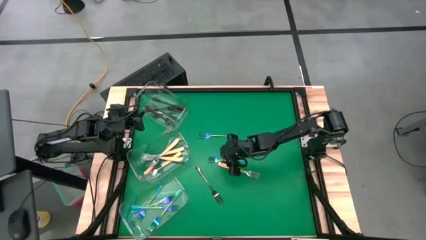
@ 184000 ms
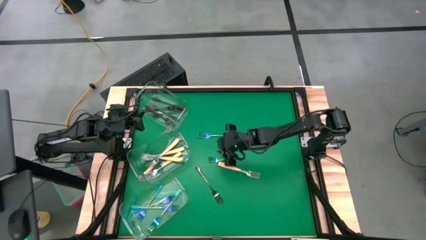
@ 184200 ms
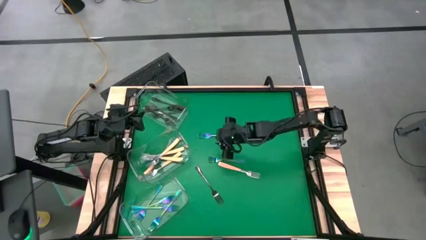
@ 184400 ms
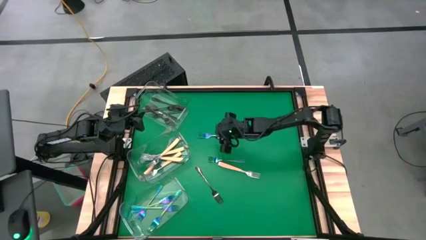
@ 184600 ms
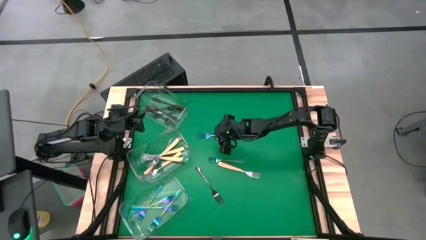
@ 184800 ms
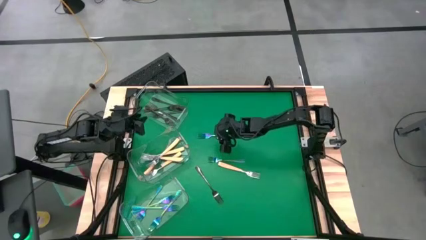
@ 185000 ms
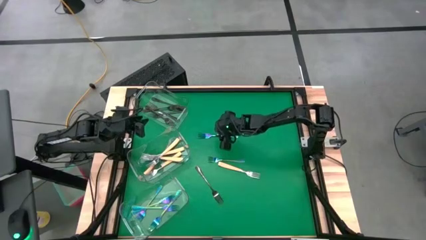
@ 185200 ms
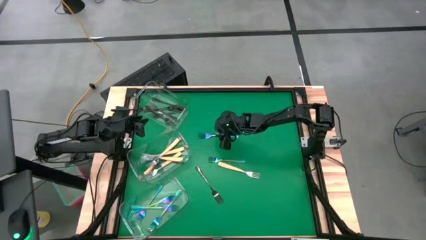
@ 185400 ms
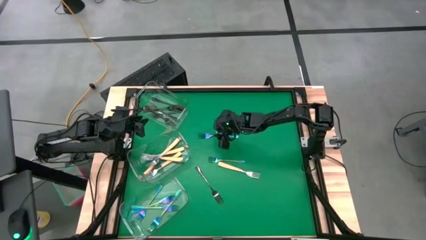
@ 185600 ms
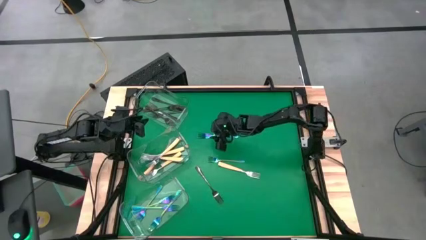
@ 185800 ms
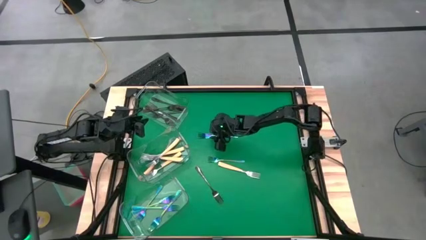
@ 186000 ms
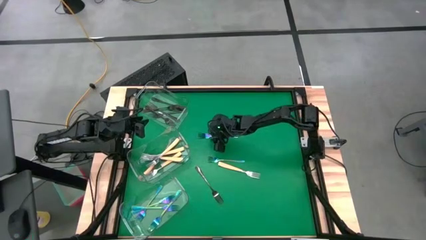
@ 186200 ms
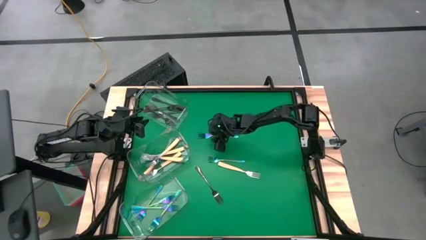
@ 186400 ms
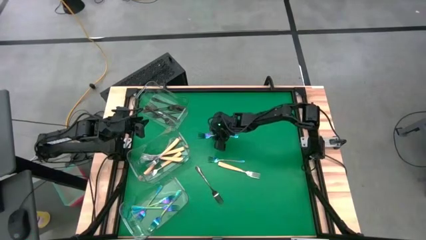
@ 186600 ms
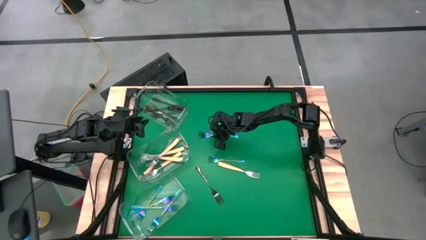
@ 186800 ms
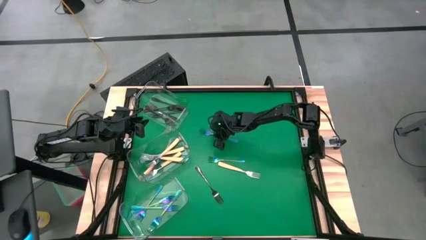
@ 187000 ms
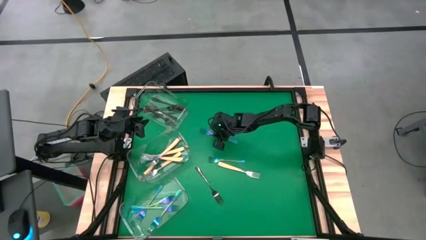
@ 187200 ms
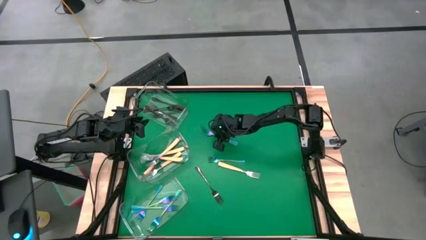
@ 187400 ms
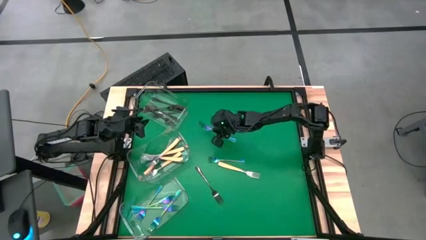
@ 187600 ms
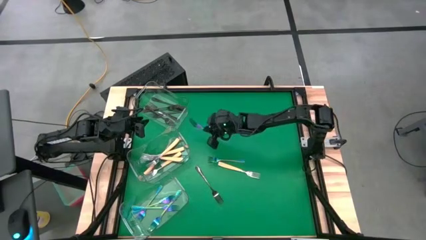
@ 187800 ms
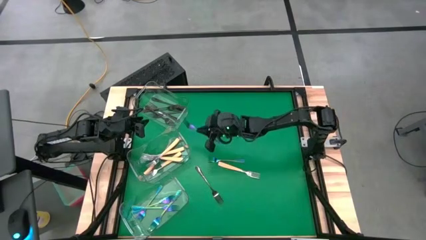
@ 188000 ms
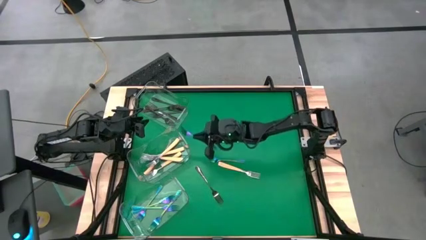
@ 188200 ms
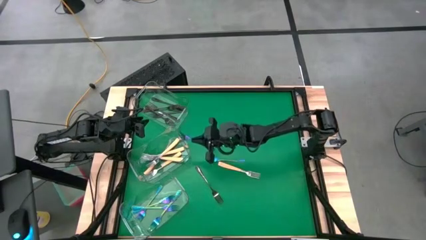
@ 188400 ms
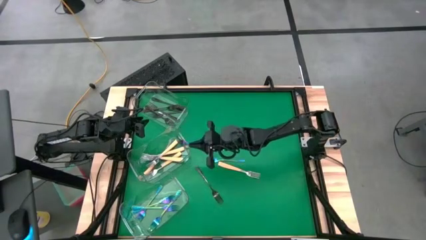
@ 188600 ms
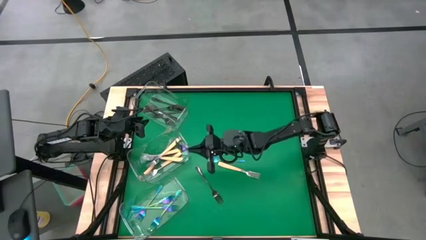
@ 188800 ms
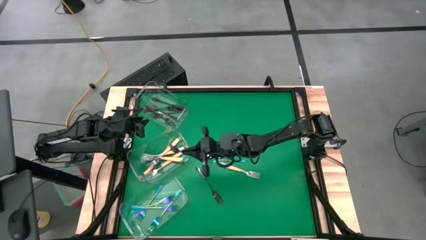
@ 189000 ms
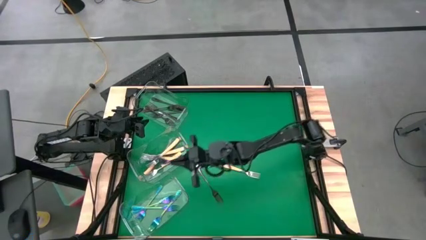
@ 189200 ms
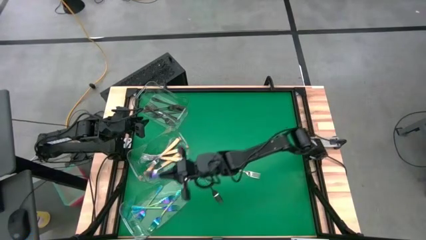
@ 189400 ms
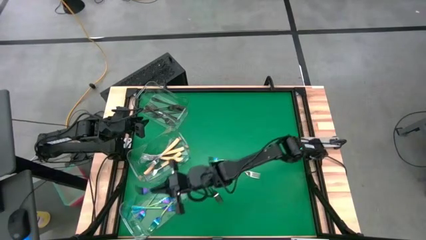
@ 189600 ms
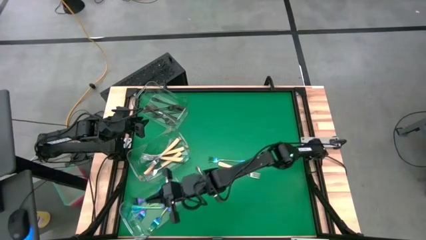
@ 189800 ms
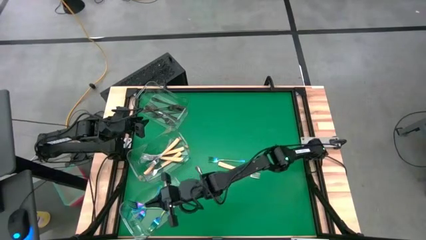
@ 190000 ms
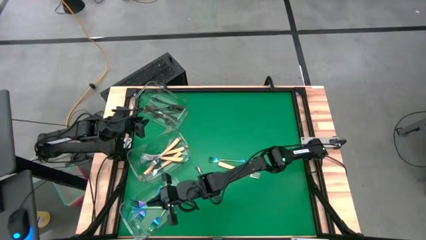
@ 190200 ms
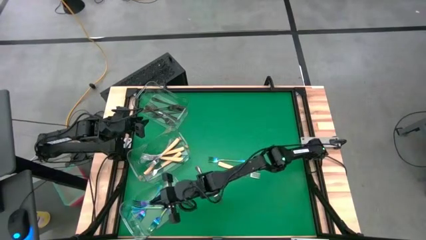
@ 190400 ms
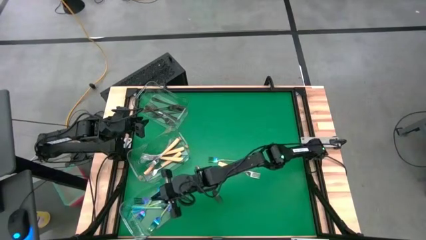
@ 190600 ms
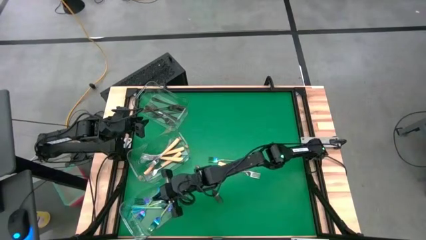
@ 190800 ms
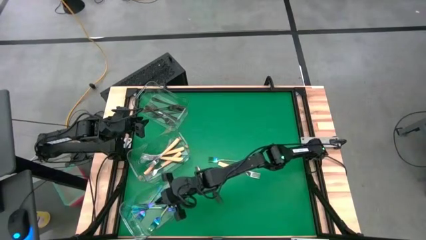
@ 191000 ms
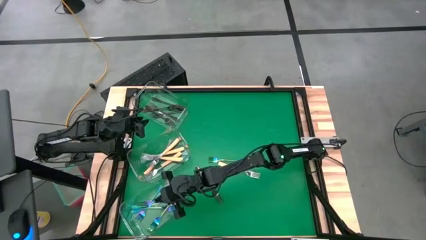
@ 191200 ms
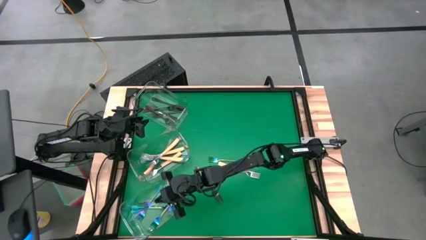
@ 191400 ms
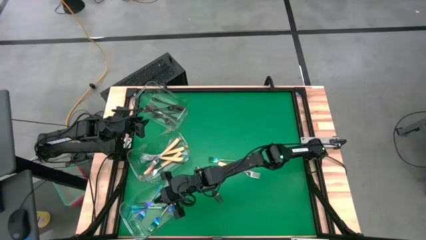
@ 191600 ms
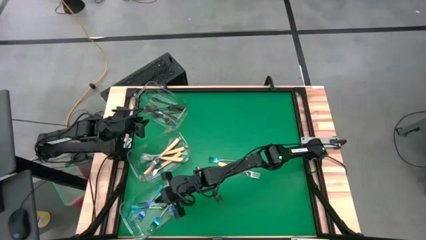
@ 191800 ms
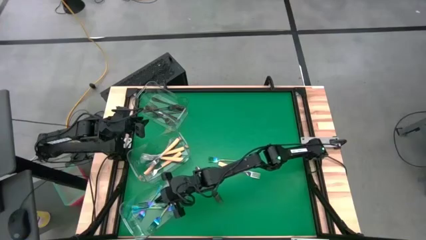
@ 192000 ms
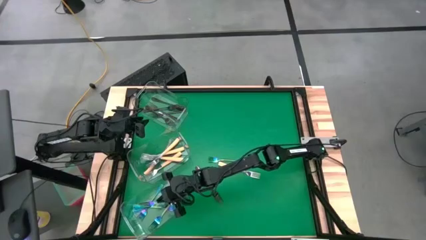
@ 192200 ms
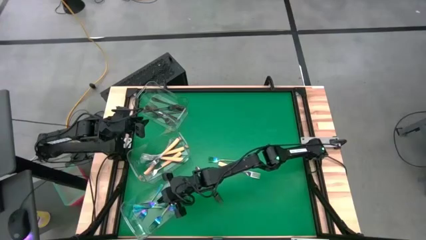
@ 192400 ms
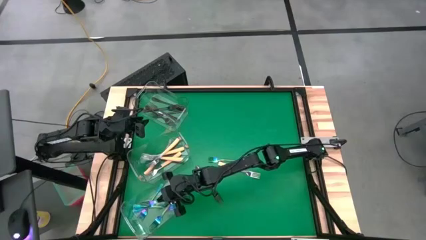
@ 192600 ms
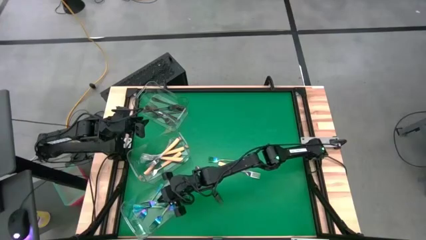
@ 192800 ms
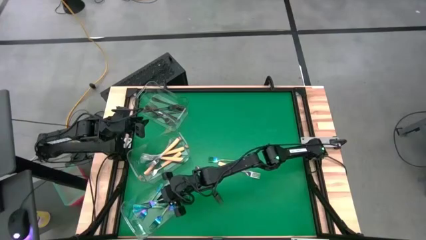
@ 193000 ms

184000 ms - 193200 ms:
Task: Sort silverware by color (type)
Put the blue fork into the bottom transparent bin

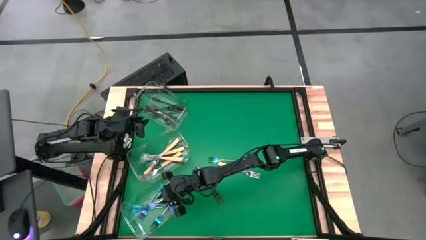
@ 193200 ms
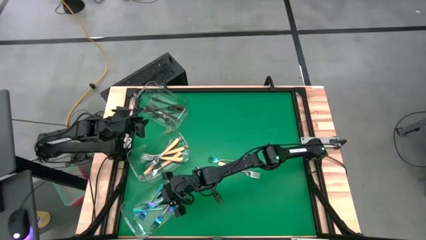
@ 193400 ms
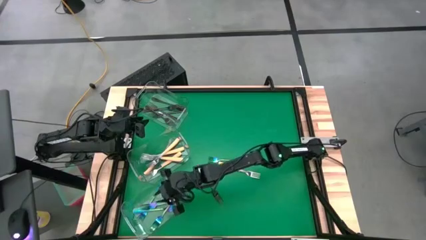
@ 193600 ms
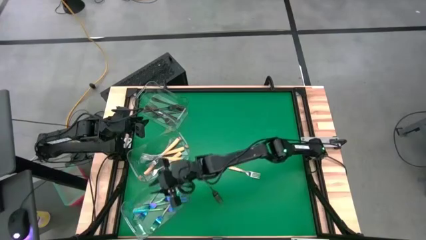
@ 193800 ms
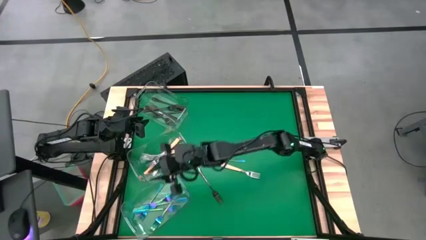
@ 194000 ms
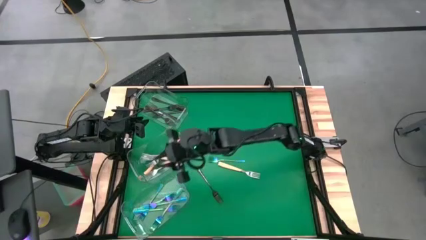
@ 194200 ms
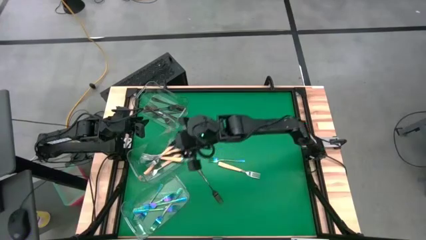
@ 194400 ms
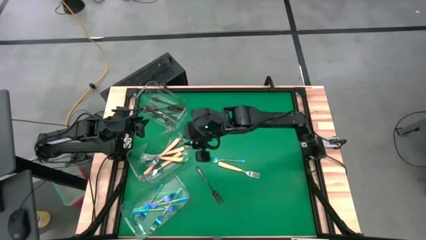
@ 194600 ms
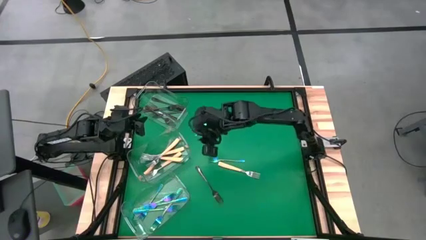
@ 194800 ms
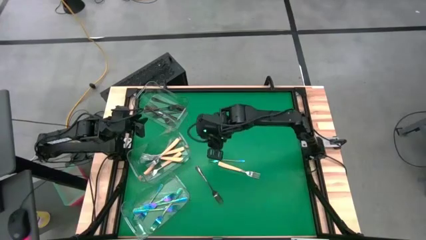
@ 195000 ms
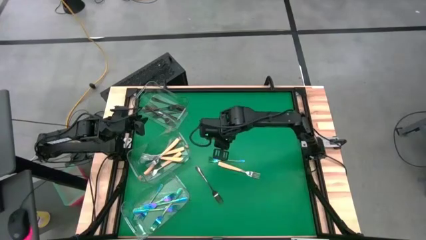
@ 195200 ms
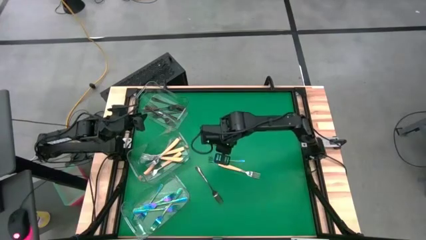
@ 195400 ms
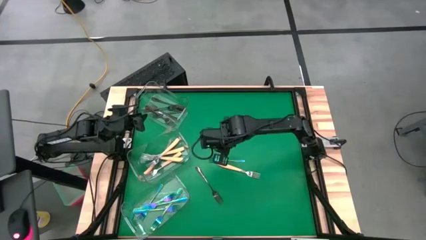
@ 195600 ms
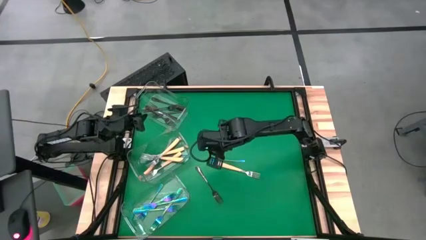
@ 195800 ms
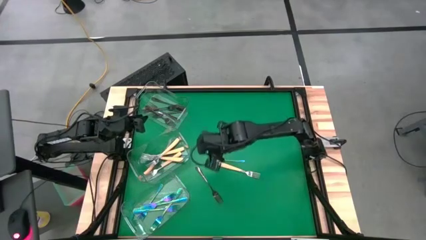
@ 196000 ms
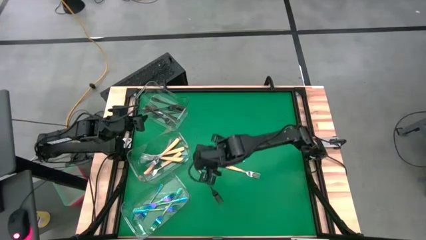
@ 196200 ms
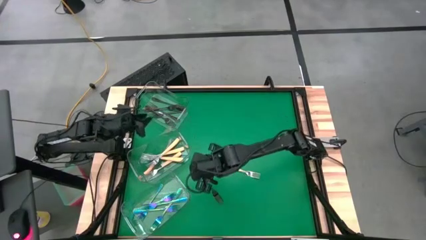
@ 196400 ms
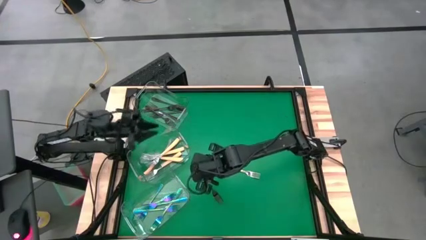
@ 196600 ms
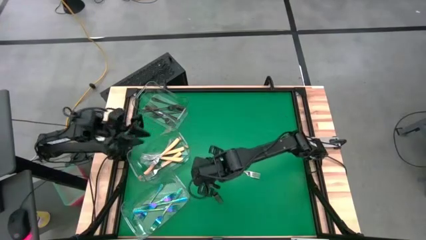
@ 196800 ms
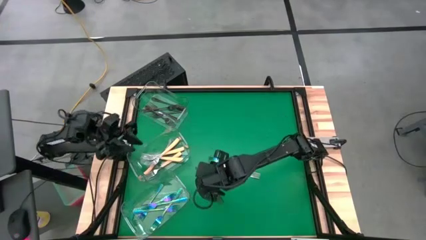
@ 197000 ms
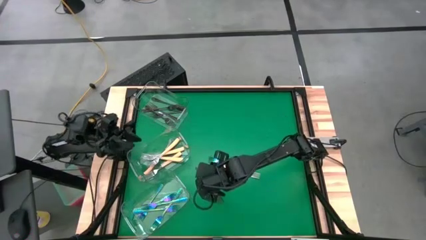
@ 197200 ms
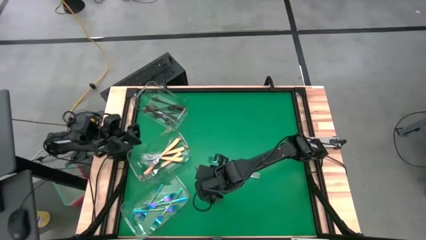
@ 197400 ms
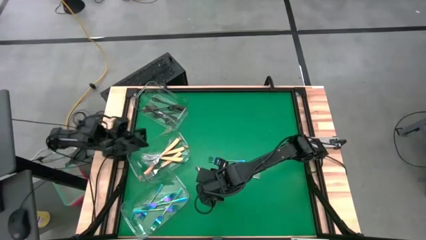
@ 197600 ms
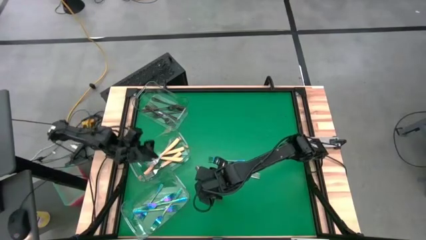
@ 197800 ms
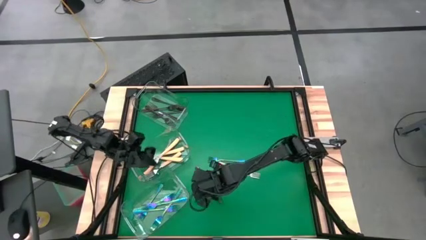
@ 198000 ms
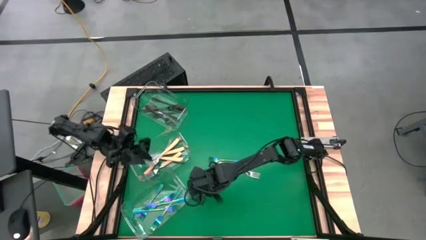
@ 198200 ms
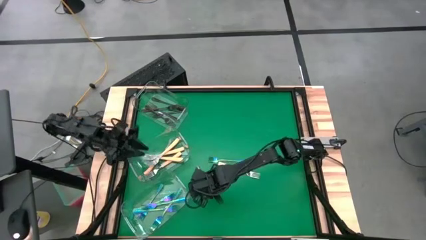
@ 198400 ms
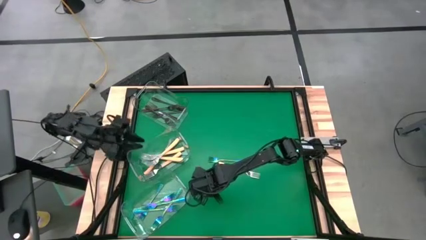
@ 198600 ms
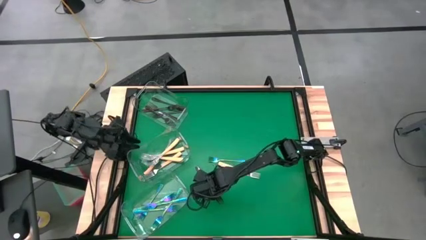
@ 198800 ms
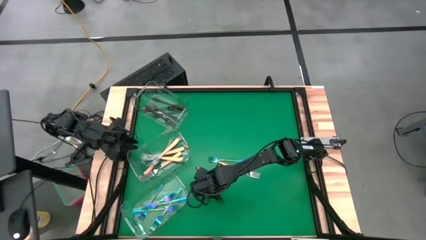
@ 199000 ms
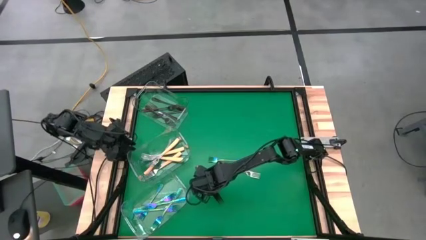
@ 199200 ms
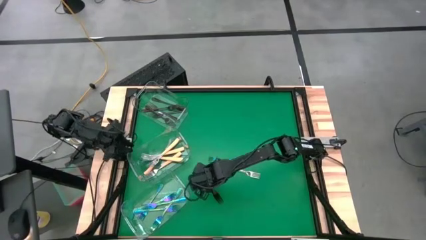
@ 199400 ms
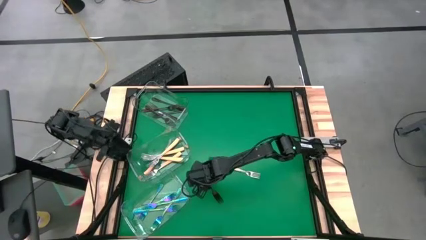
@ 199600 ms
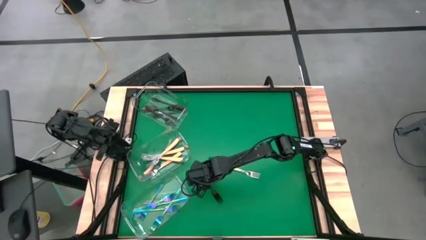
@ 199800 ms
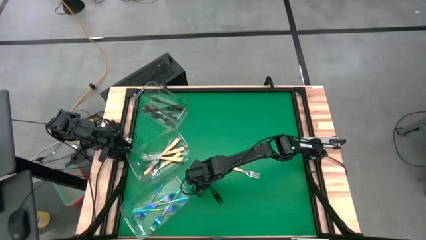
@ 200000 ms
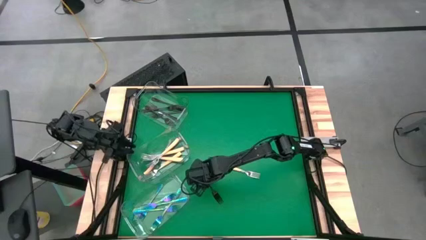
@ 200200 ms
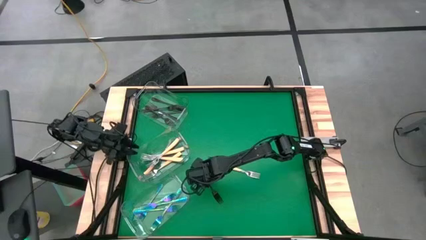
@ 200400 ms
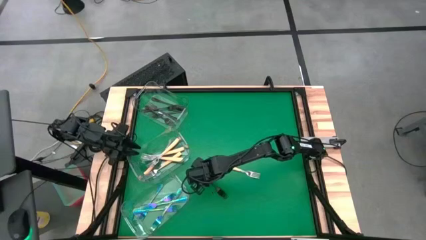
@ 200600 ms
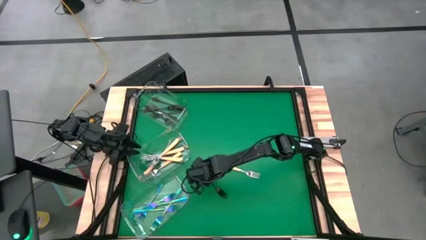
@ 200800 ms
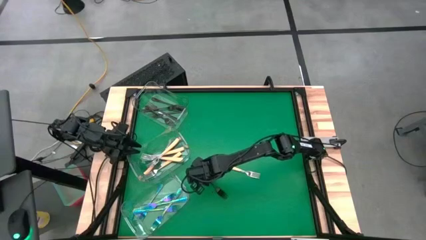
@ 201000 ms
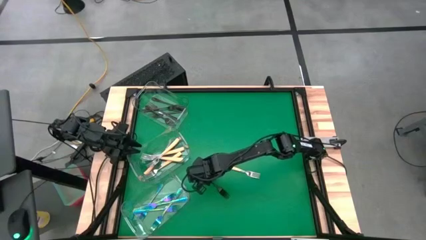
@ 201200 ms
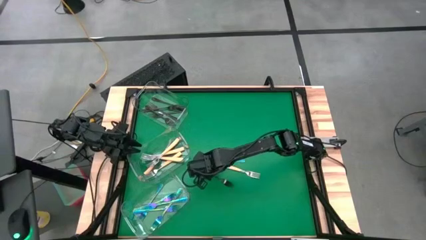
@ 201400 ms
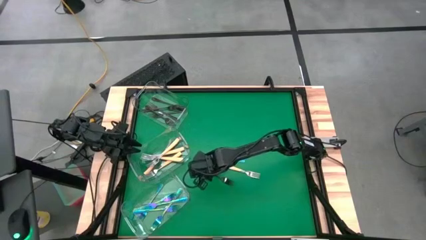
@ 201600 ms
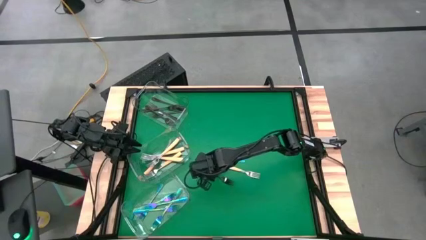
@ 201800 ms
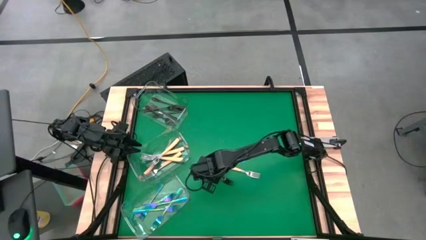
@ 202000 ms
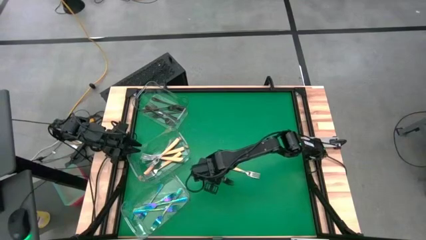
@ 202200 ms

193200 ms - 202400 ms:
Put the black fork into the top transparent bin
